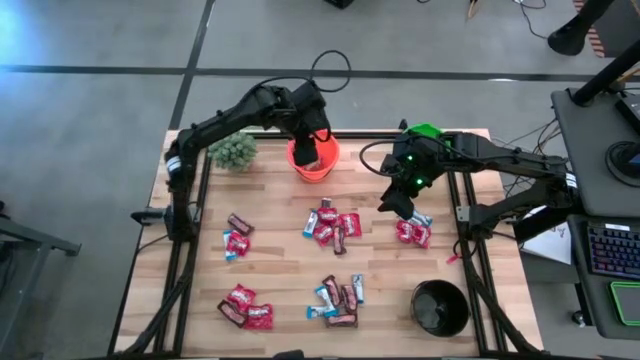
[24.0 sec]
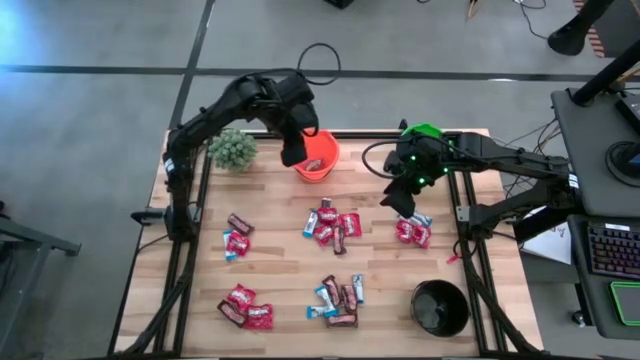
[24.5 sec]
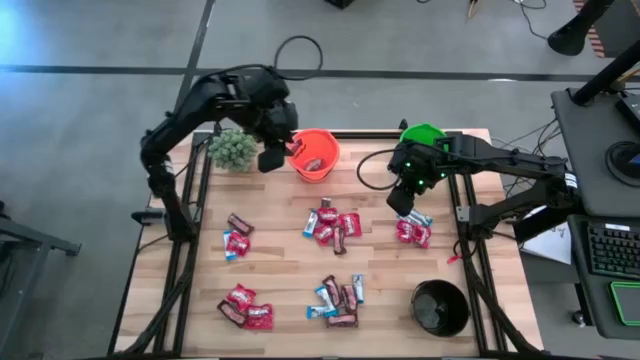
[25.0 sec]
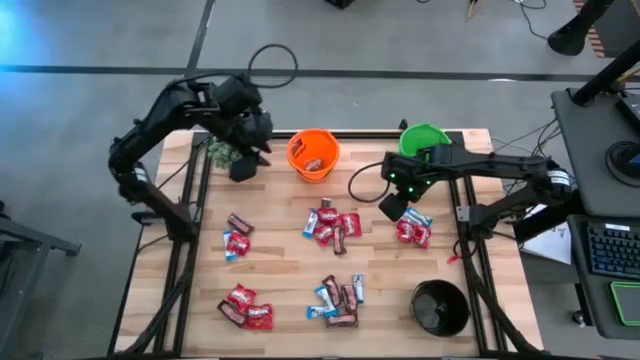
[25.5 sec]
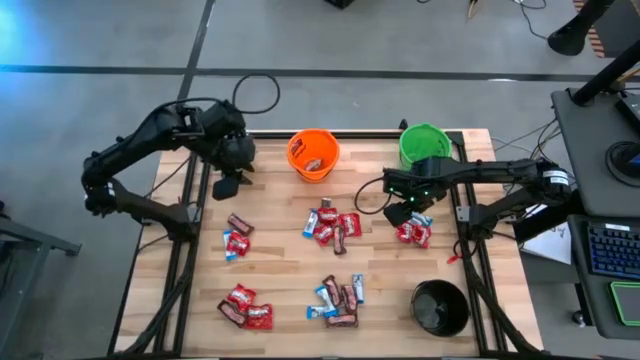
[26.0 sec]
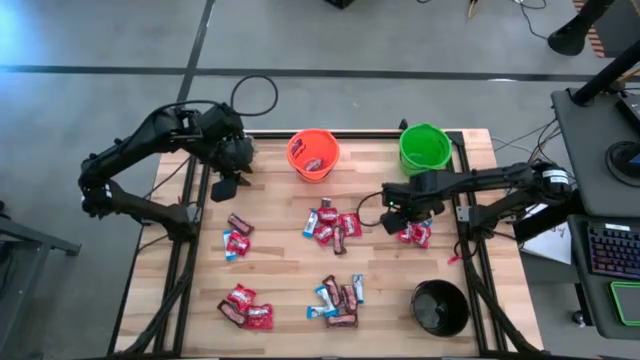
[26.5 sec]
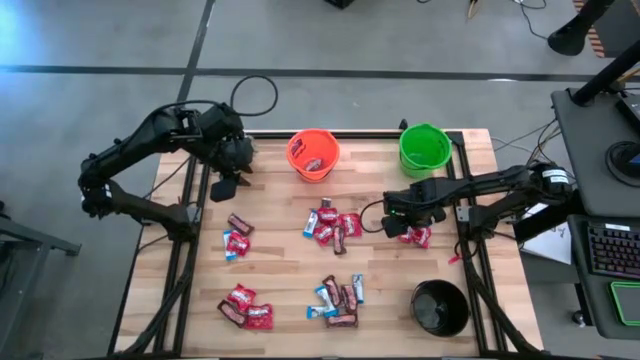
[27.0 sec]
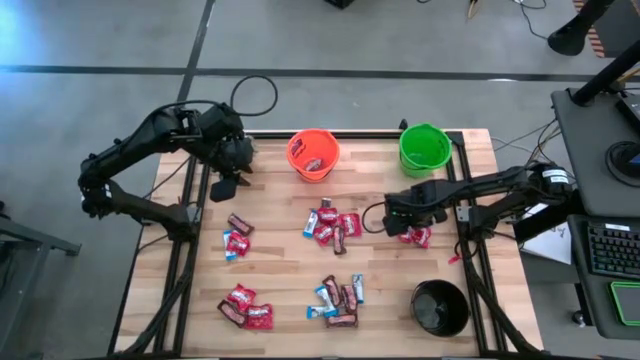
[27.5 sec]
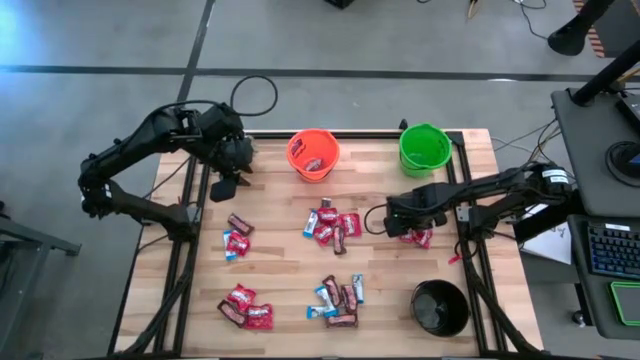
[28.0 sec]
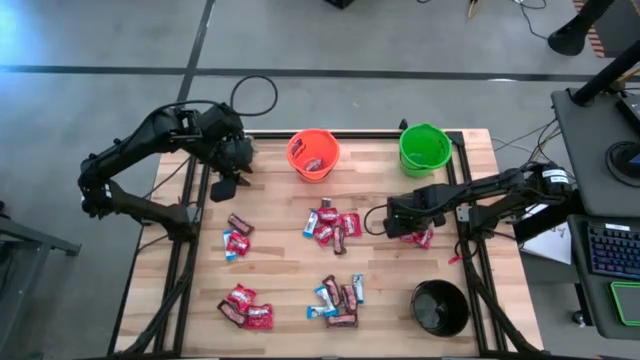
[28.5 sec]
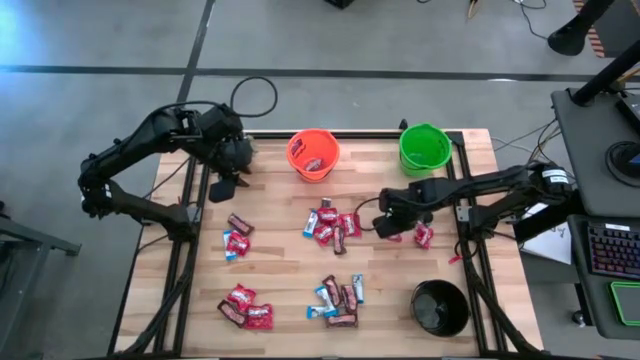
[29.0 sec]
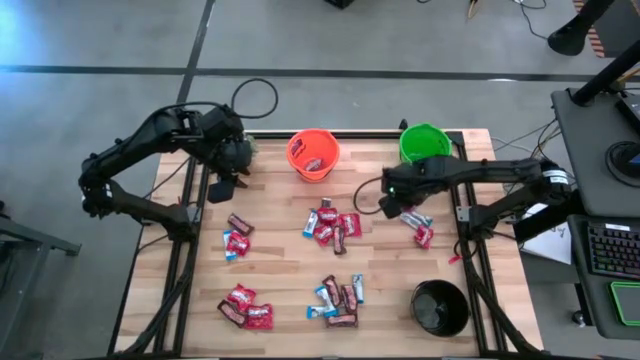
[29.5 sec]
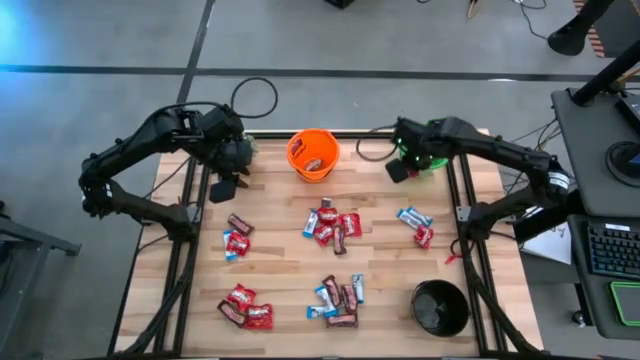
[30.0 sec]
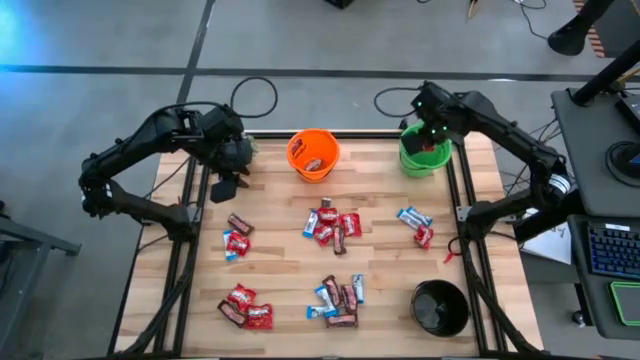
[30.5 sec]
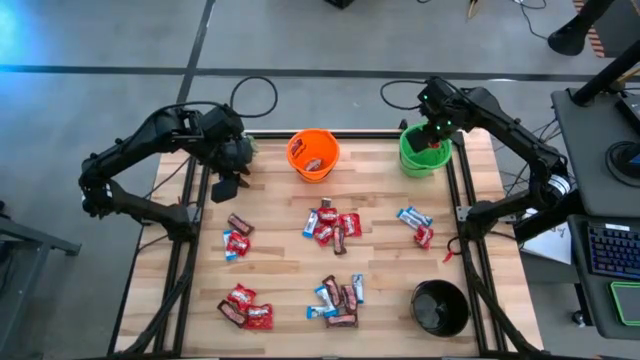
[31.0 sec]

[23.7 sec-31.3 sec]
Task: Sort candy
Put the red candy into the green bucket

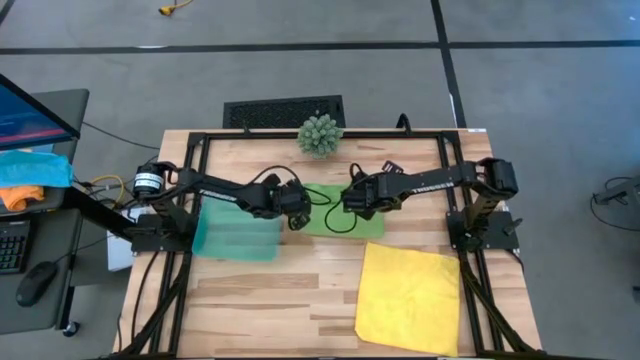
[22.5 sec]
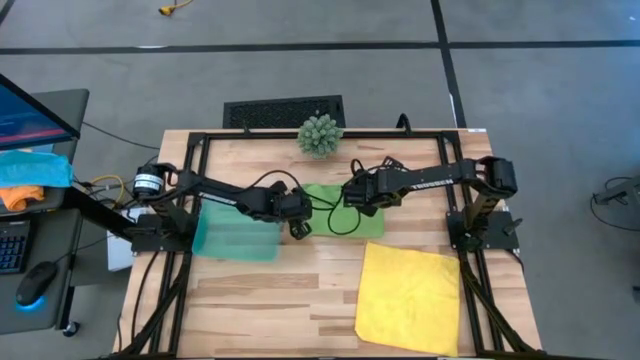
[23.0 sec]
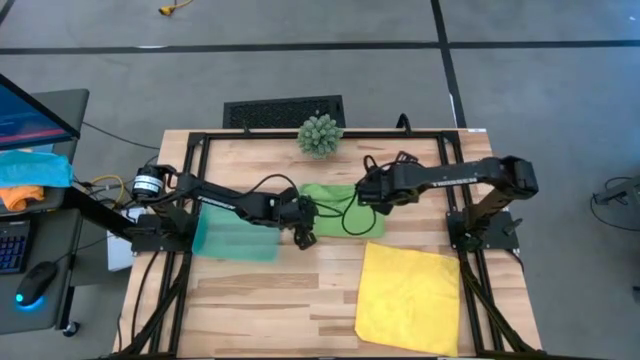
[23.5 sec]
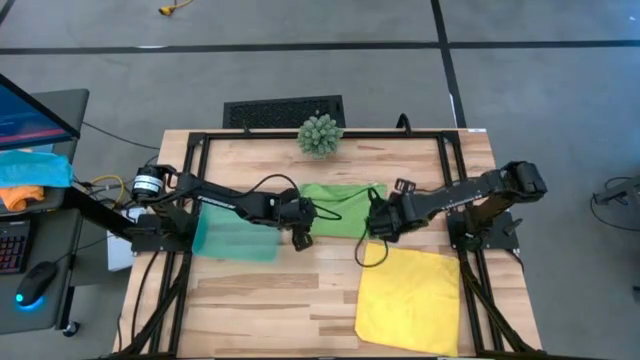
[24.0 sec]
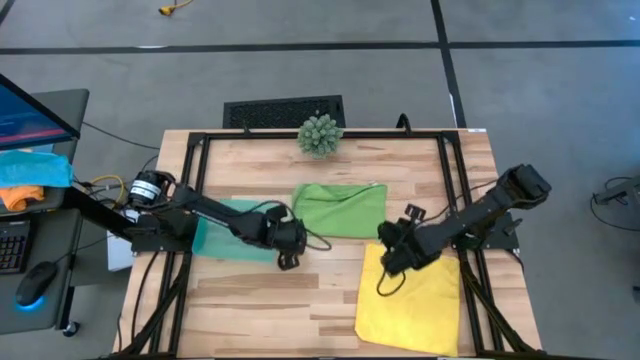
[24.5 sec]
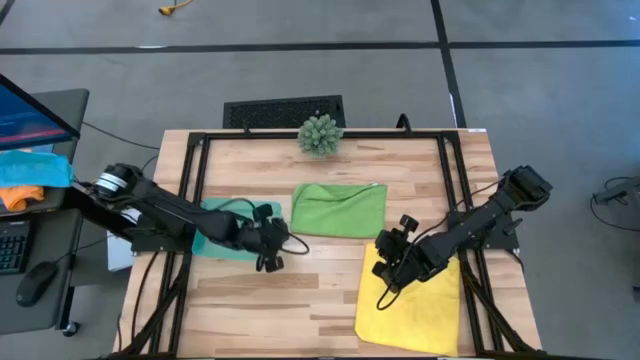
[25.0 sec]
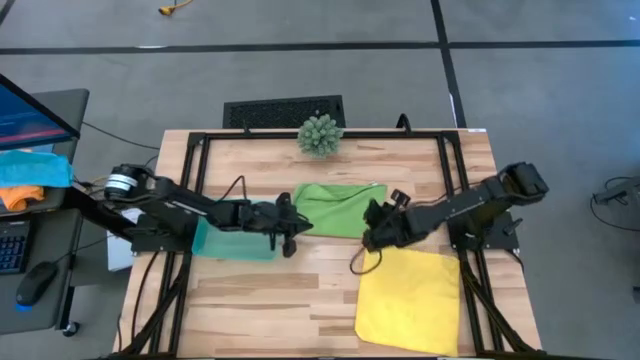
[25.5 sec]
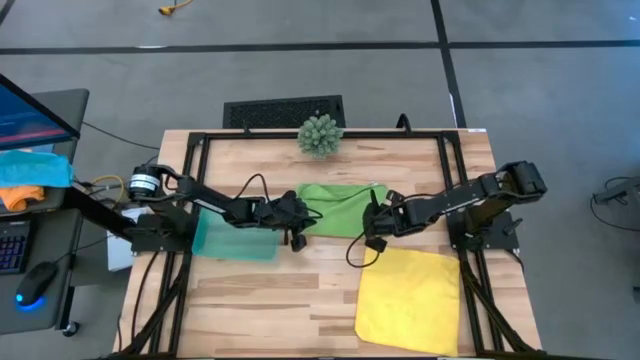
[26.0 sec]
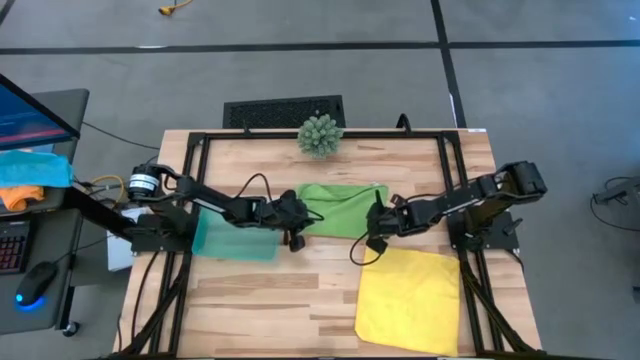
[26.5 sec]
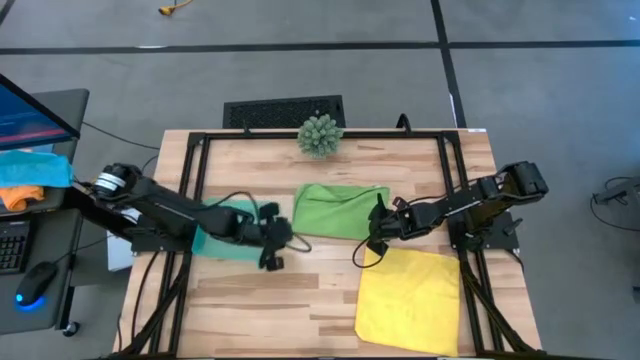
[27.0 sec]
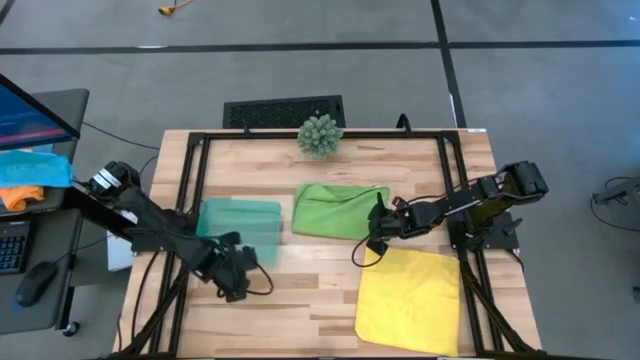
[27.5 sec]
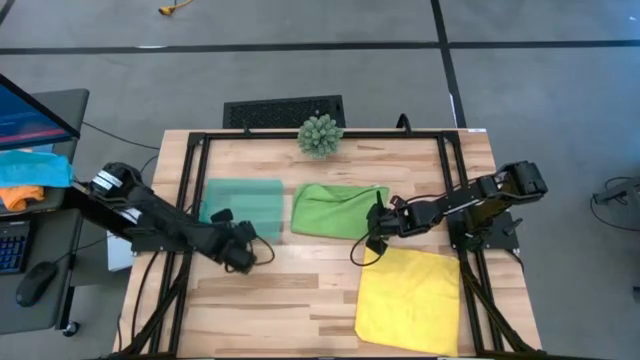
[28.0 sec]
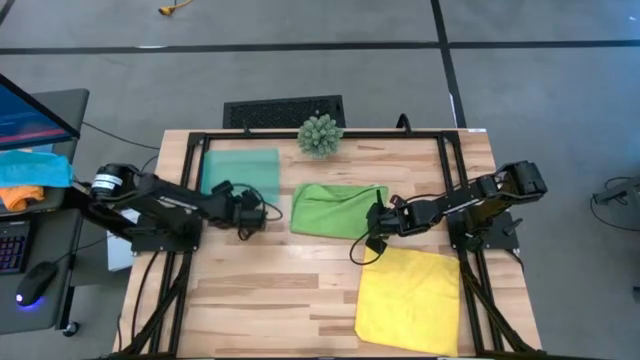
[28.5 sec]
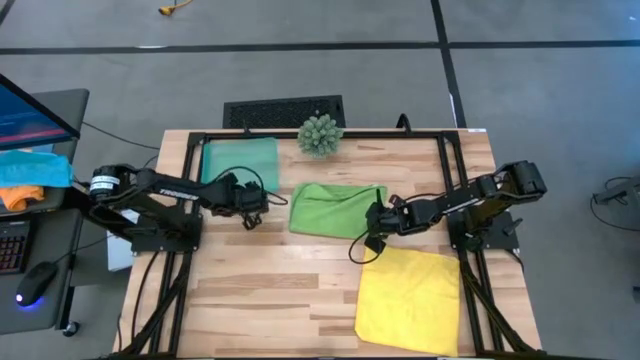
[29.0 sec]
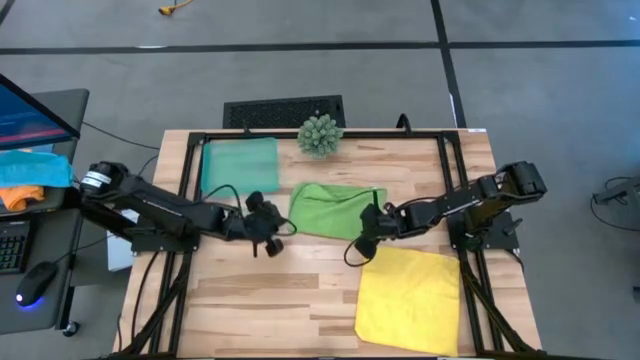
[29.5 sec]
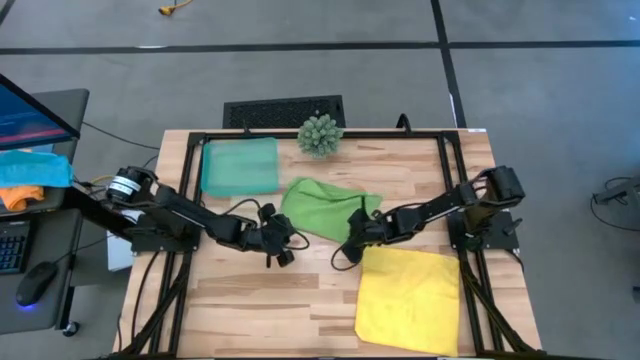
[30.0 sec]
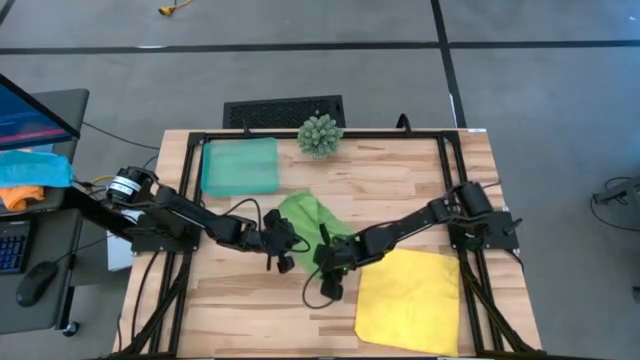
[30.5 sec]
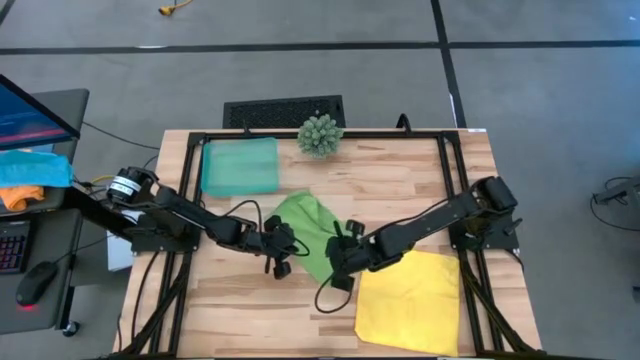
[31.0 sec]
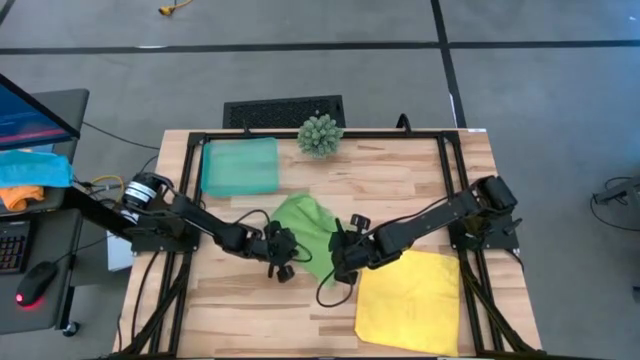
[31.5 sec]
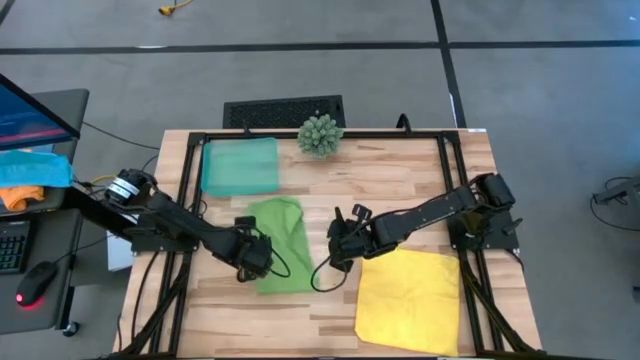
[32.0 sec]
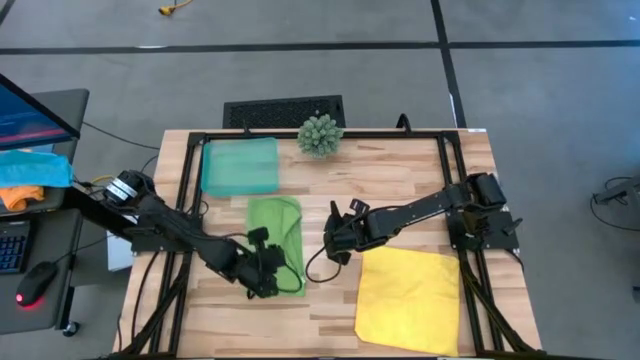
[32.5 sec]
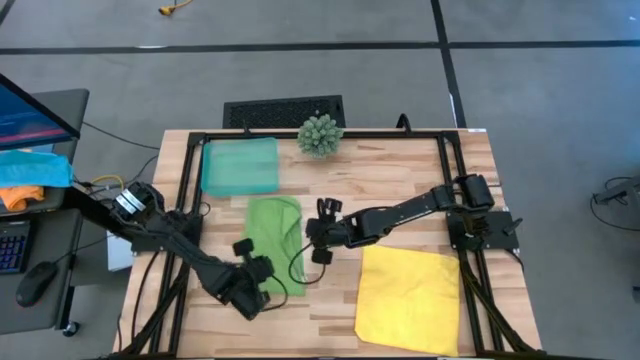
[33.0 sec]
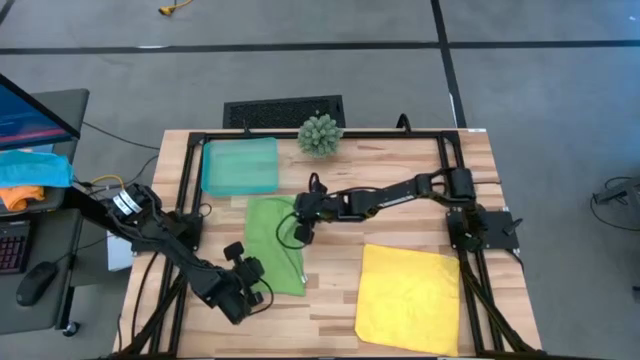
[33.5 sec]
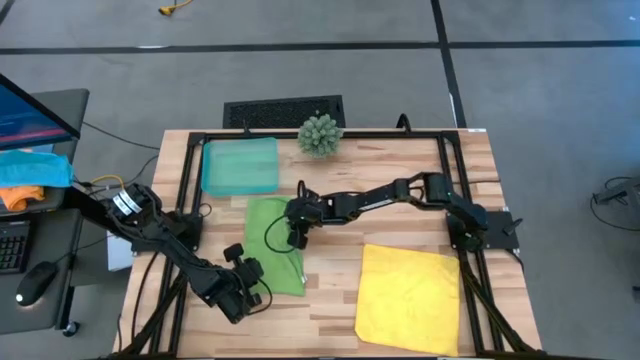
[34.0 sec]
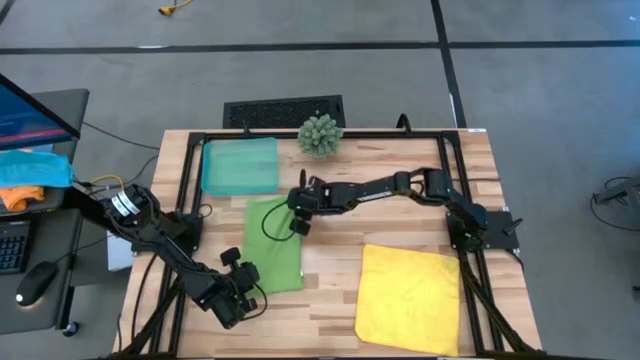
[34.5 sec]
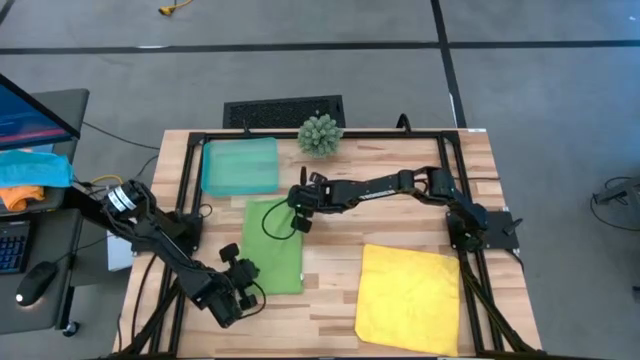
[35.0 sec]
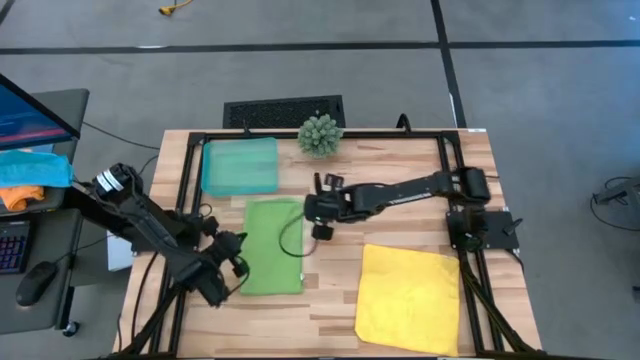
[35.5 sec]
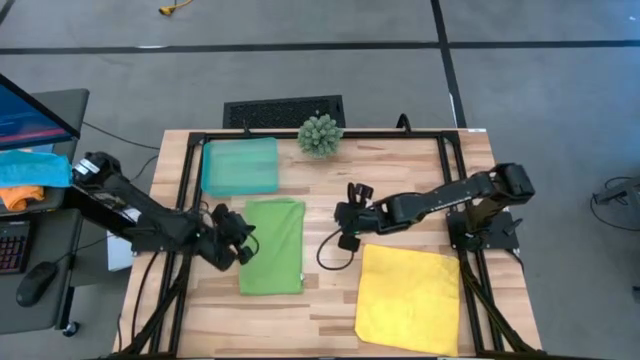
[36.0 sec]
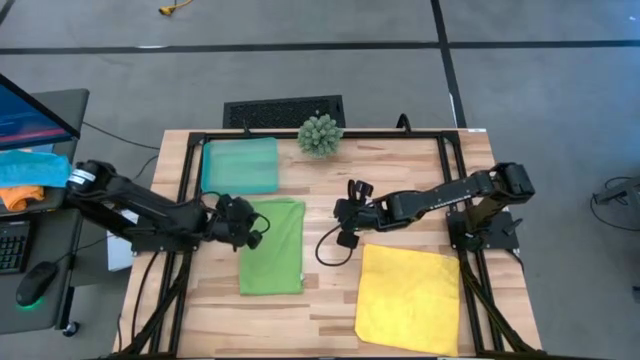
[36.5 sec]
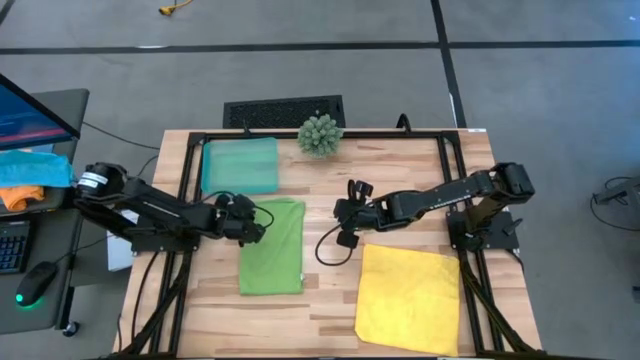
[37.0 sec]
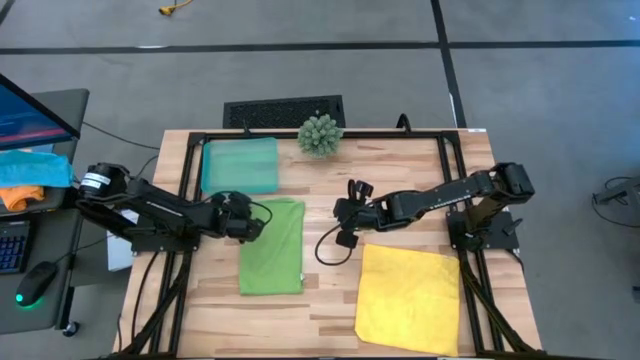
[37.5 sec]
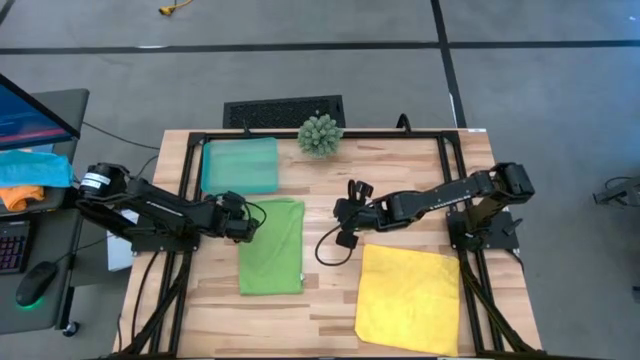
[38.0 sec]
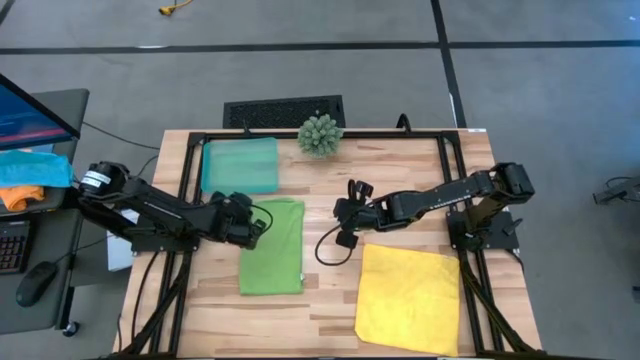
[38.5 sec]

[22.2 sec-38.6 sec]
Task: Roll microfiber towels into tight, uniform cylinder then place into a basket
Fold the green towel
